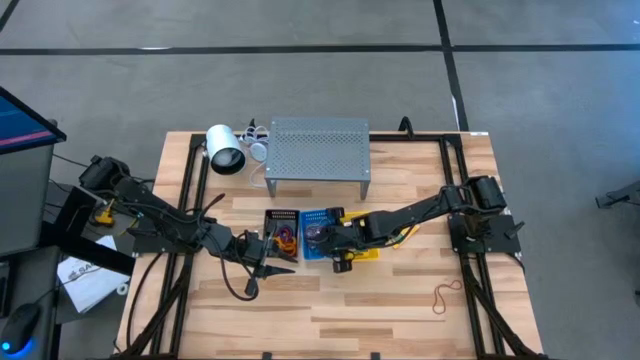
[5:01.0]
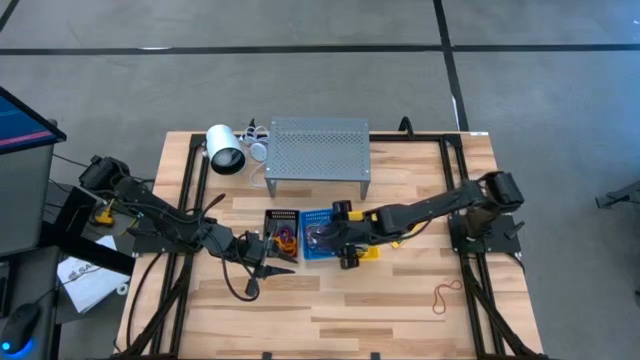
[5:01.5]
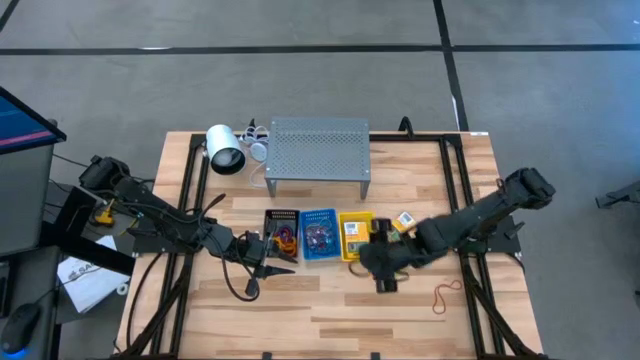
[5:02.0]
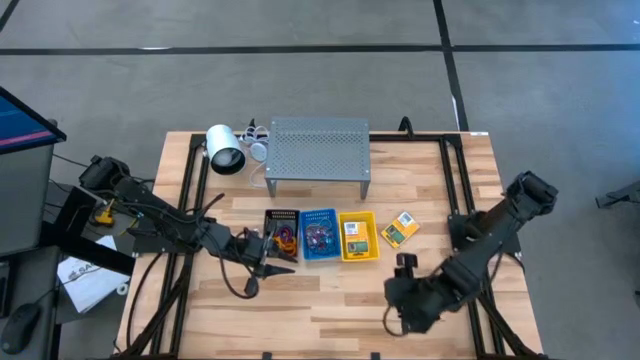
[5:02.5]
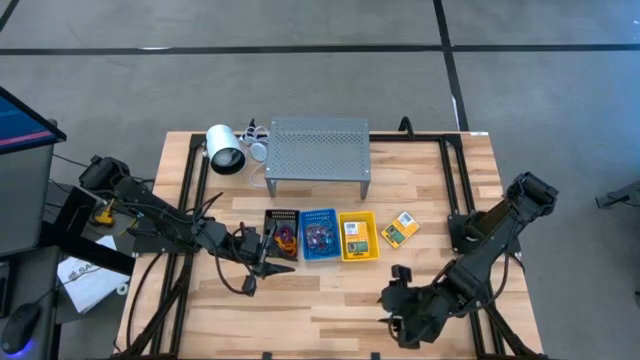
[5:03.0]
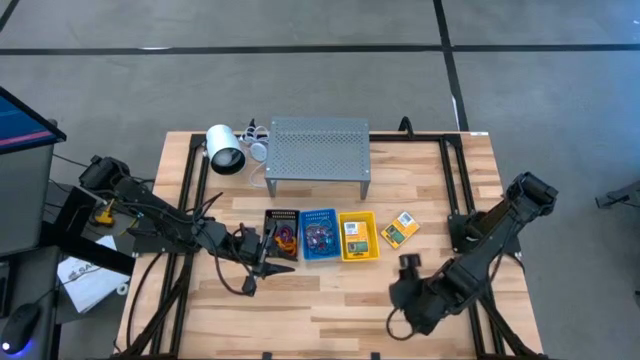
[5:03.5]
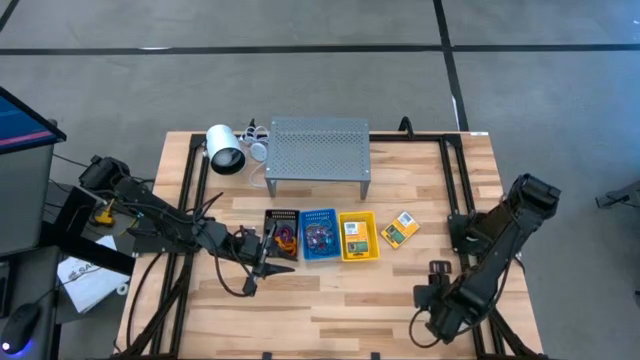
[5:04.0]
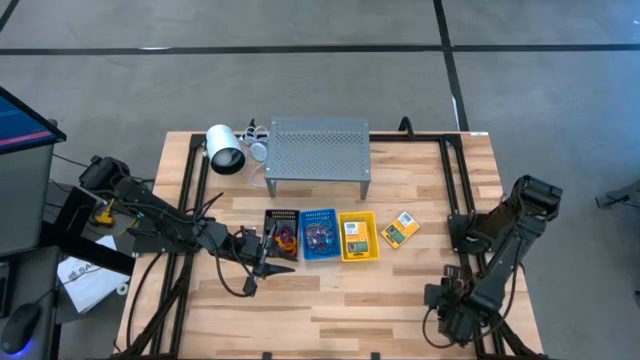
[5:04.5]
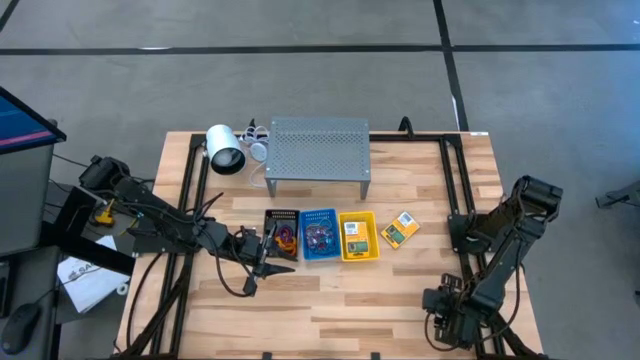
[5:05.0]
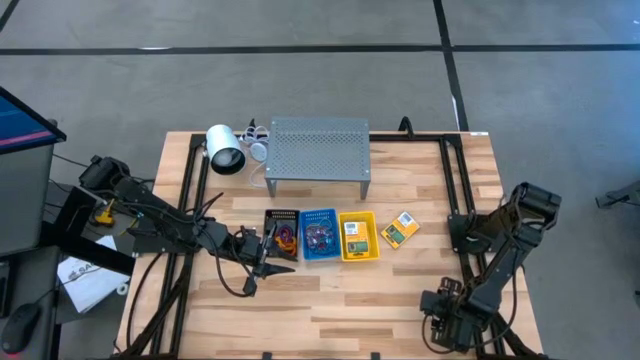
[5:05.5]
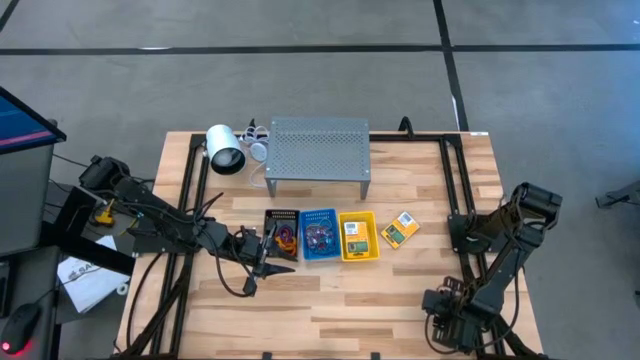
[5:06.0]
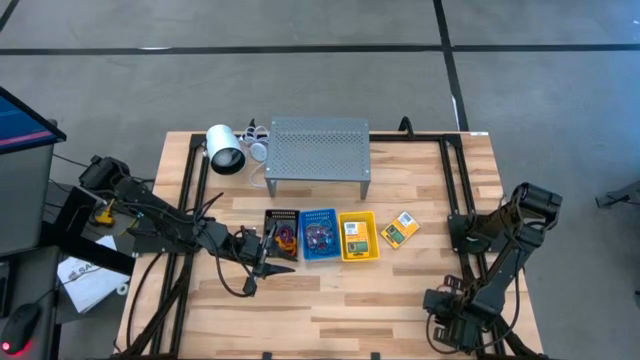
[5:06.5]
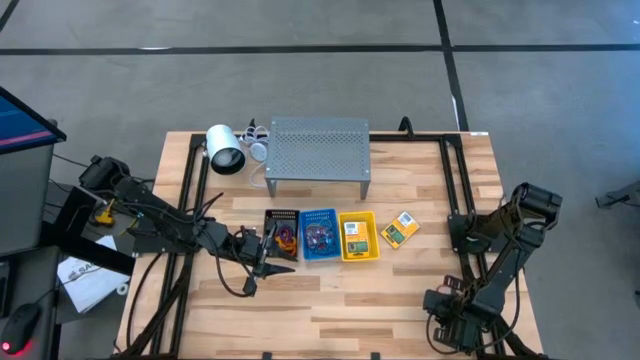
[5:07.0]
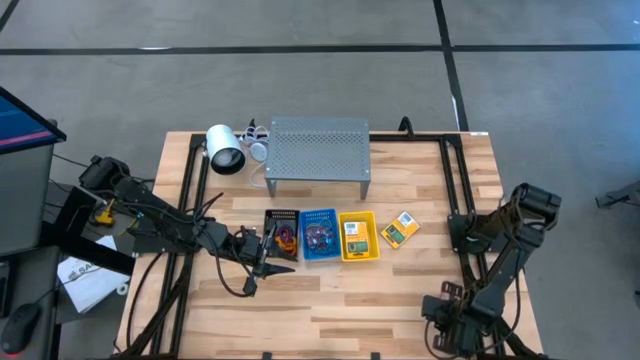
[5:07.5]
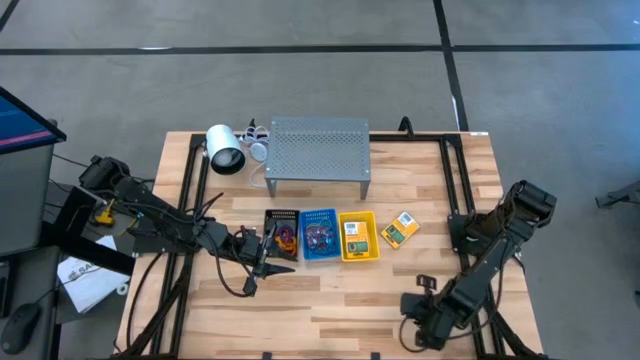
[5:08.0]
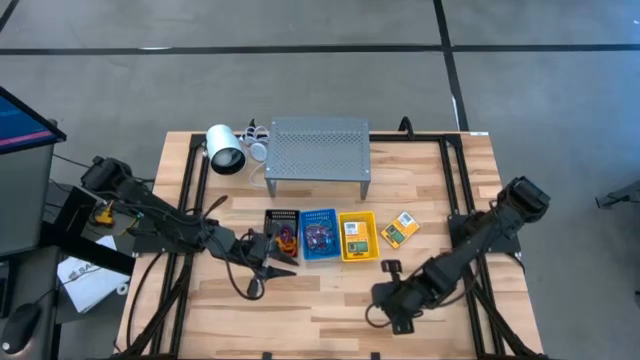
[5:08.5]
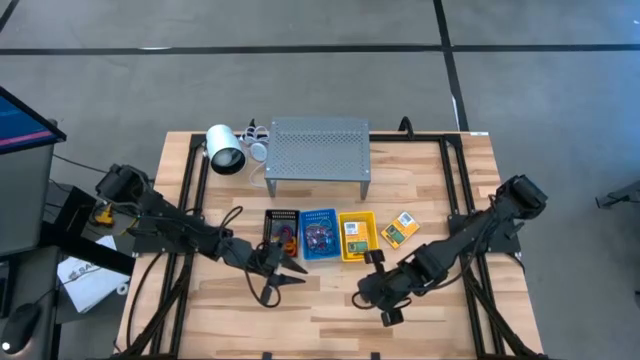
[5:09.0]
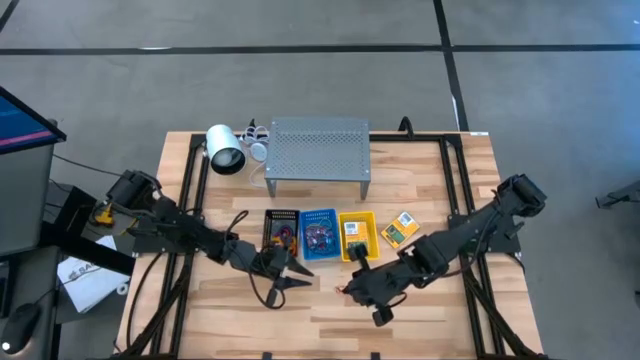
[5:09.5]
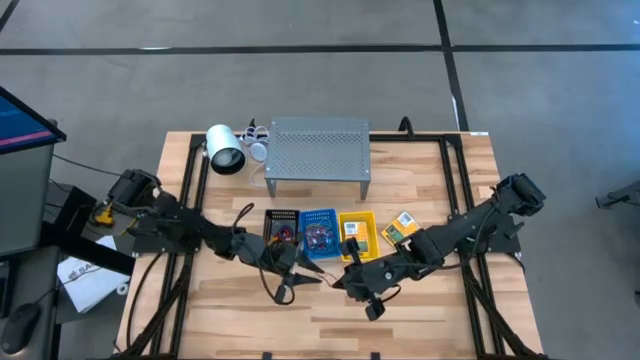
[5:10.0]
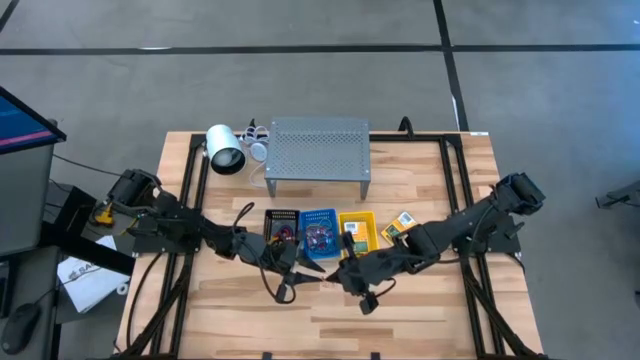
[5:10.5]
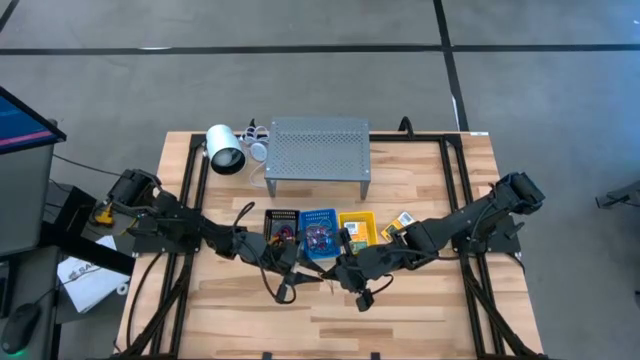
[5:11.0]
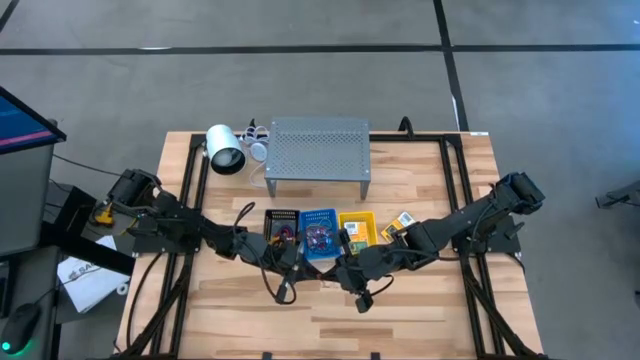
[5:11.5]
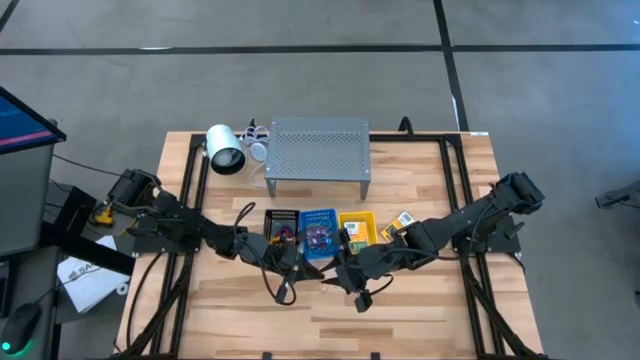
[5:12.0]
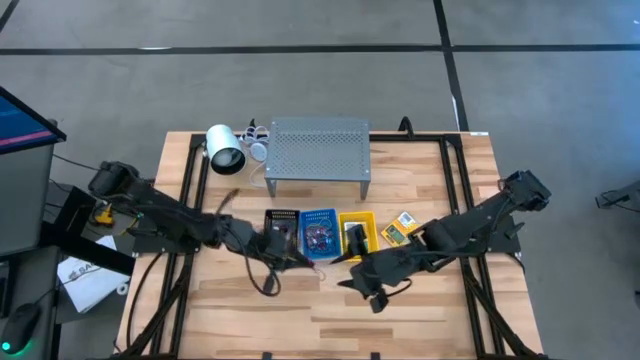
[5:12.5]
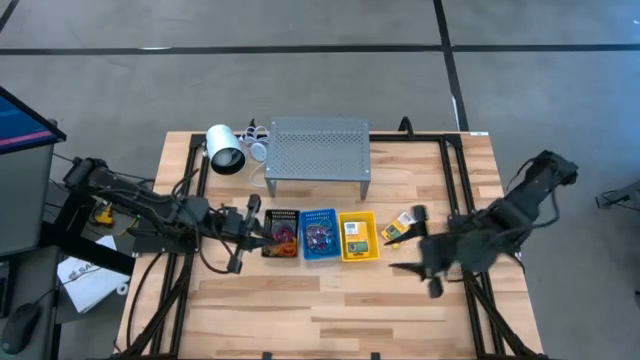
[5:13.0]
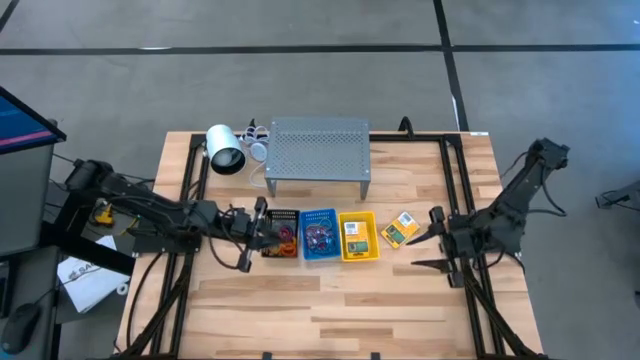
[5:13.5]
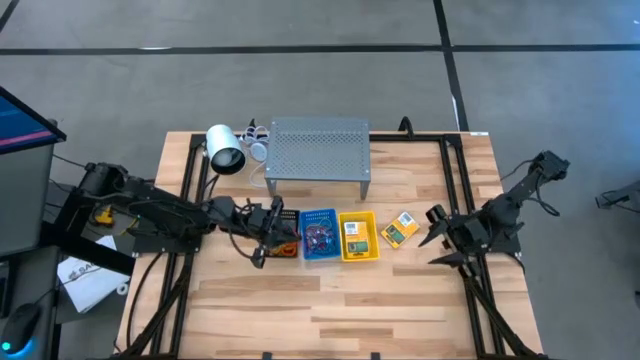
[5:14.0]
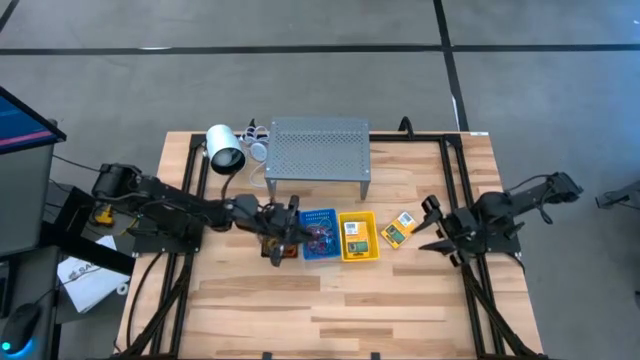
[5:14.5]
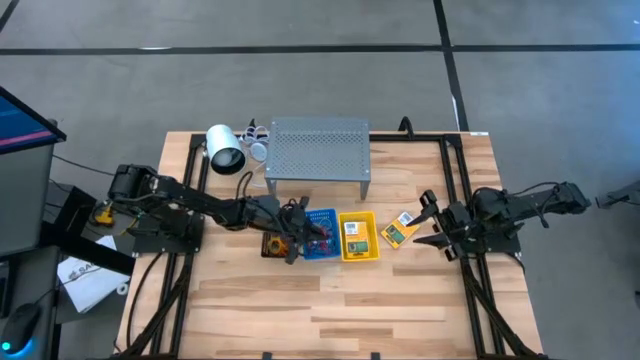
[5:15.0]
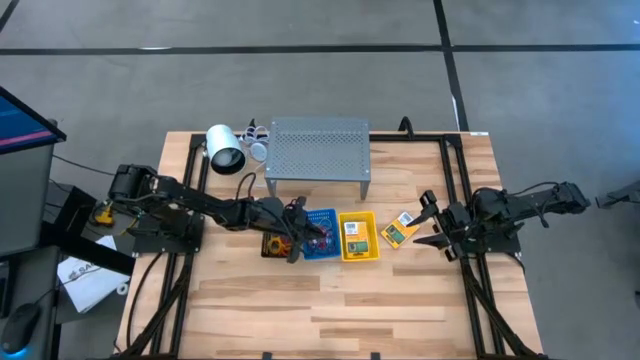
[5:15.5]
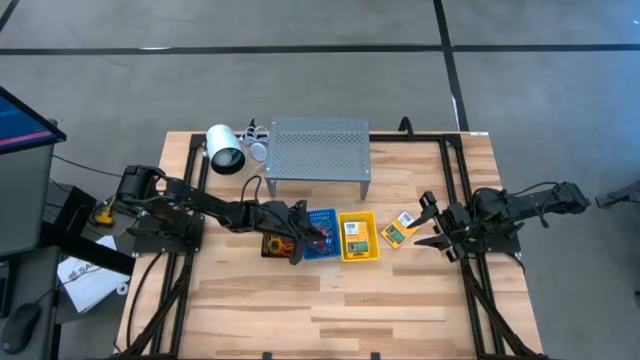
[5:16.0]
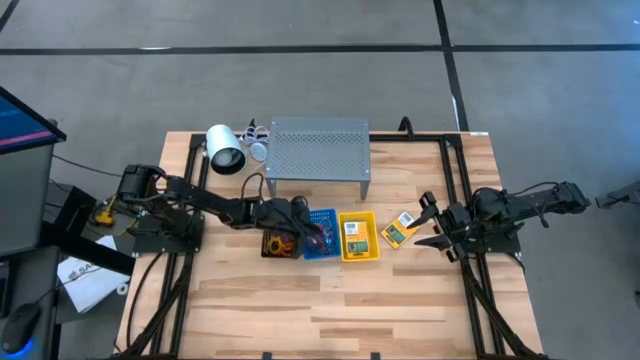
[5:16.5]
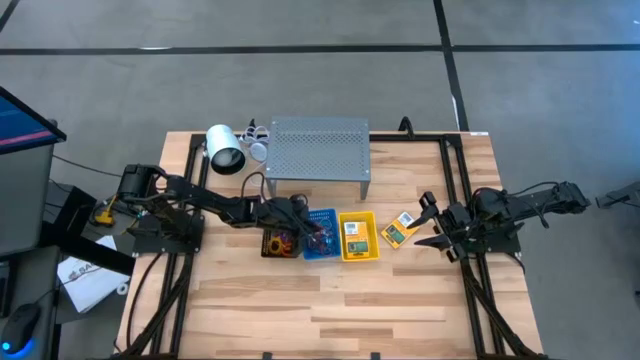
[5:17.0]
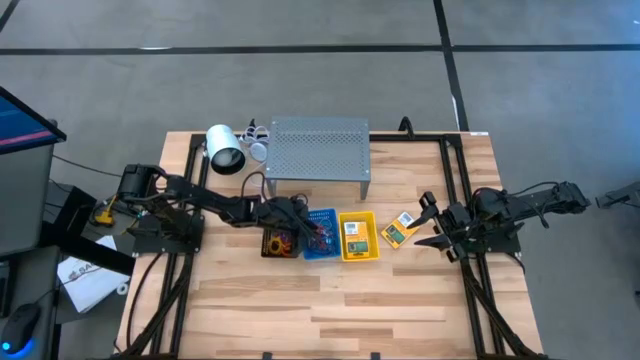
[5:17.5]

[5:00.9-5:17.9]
Task: Pick & Place Office Desk Supplies
Put the red rubber band into the blue basket

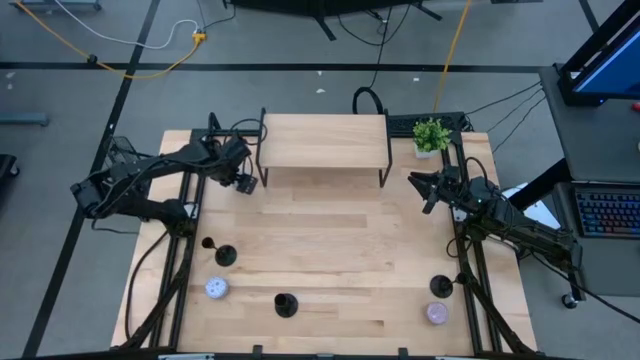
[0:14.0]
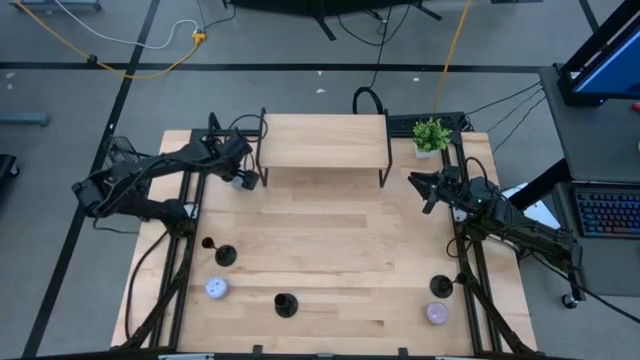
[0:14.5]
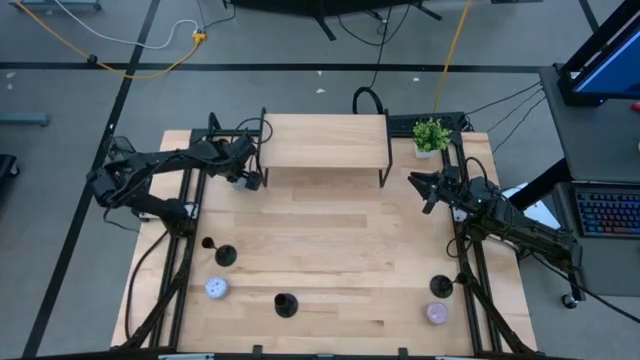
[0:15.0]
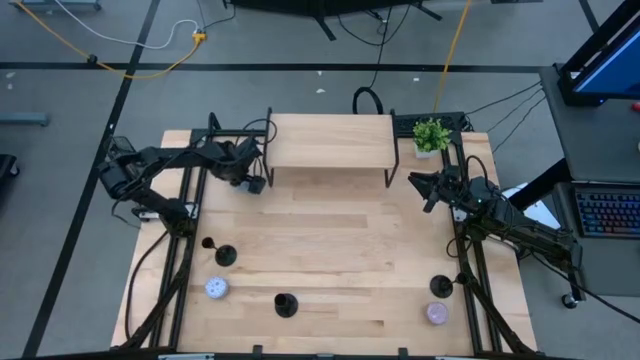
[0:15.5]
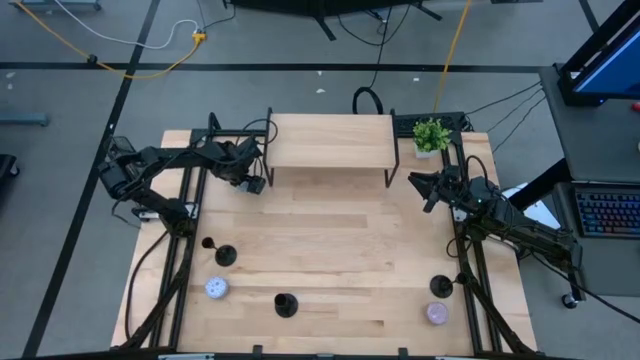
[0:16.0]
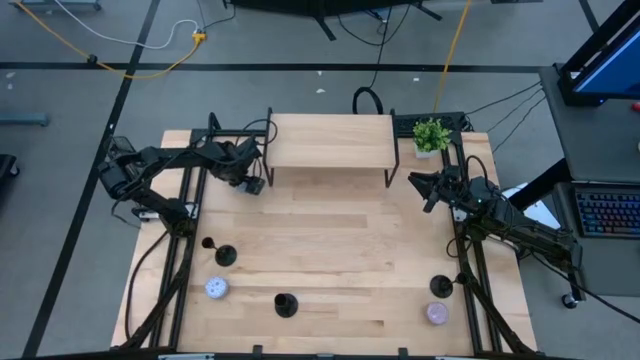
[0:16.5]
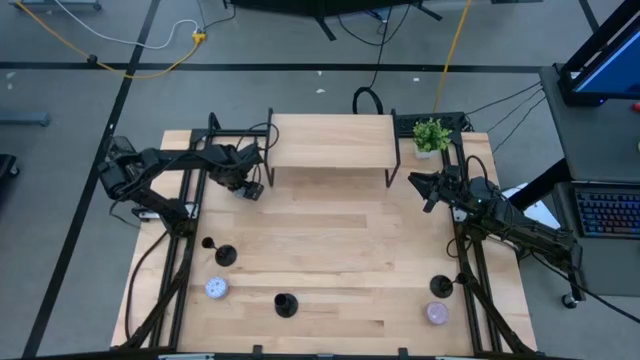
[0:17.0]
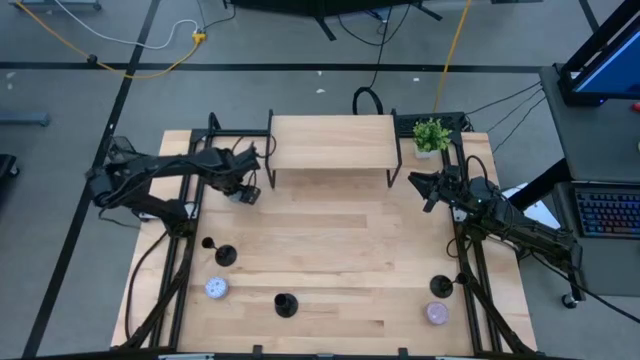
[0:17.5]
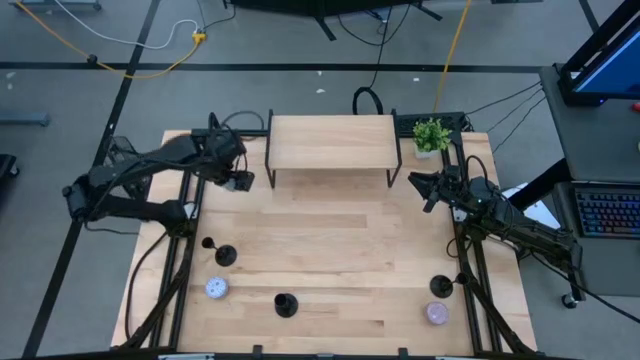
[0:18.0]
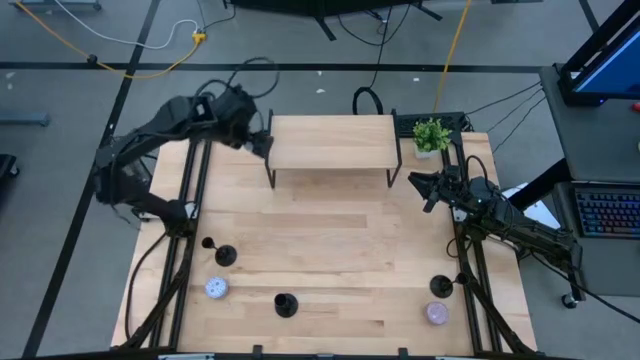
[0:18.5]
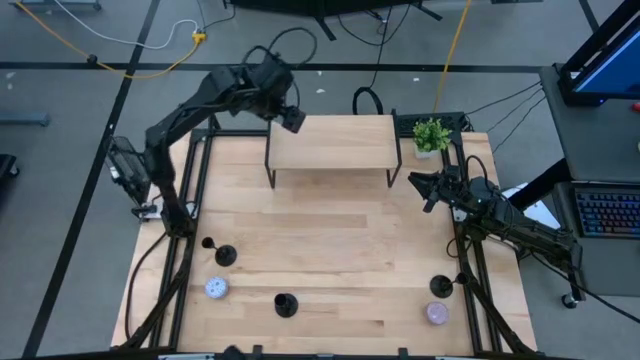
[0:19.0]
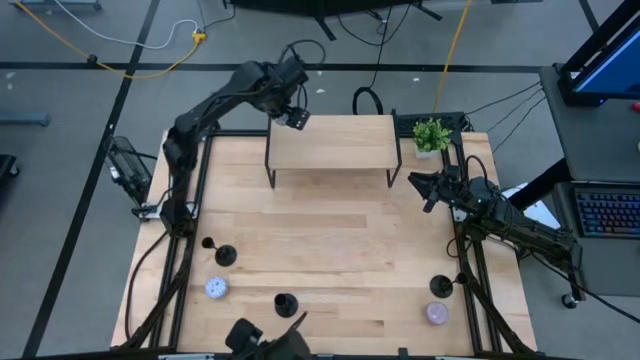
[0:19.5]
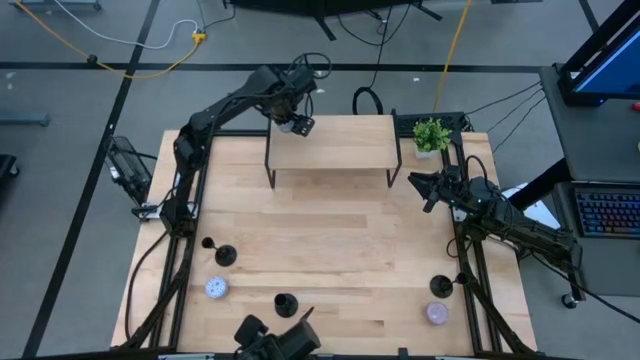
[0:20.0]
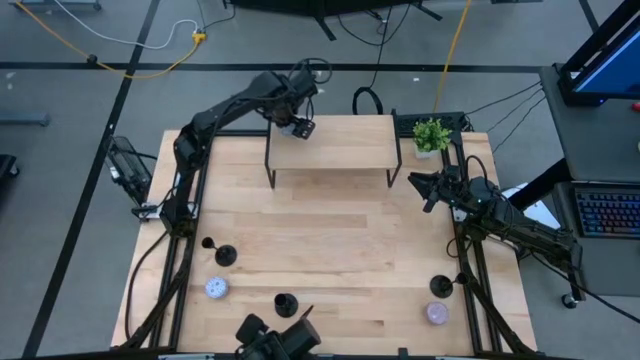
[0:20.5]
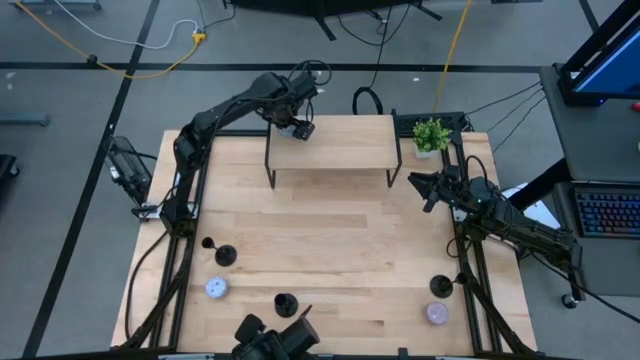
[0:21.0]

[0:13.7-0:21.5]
Task: Pick & Place candle stick holders
Put the blue scented candle on the shelf
